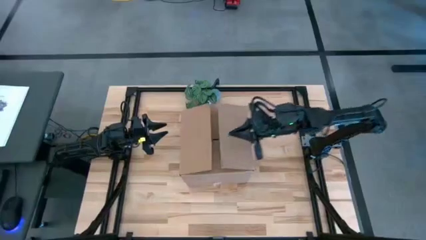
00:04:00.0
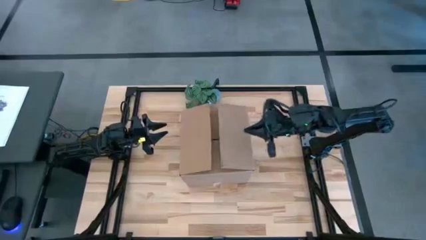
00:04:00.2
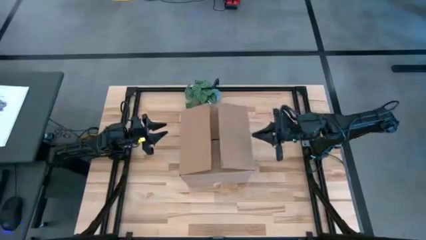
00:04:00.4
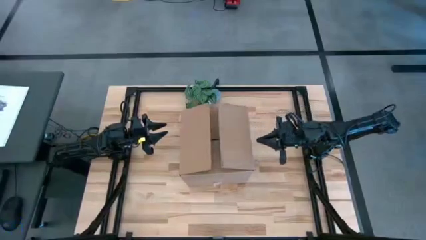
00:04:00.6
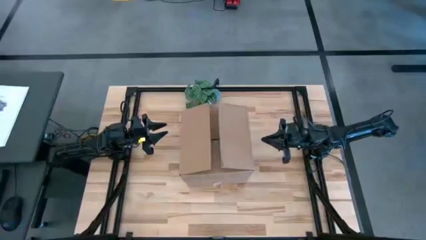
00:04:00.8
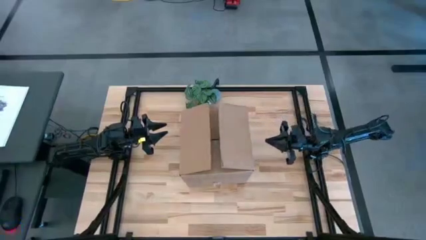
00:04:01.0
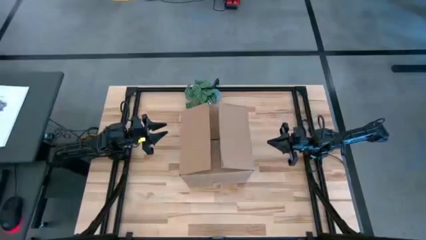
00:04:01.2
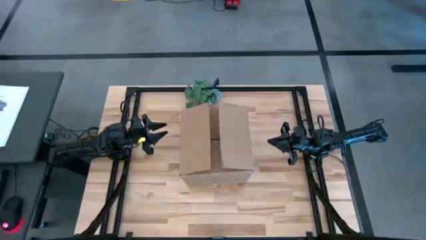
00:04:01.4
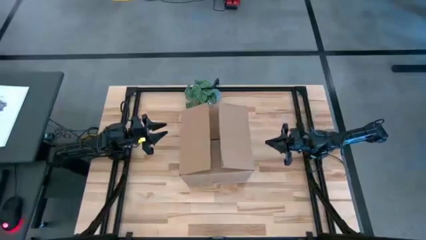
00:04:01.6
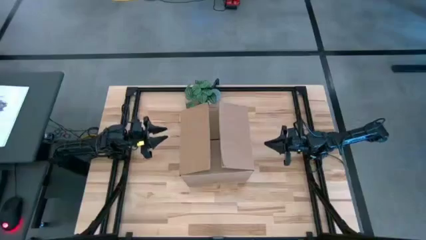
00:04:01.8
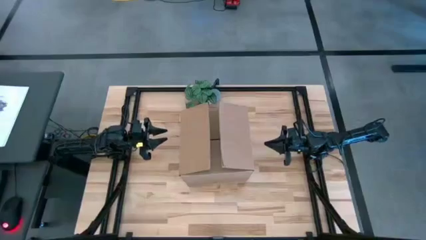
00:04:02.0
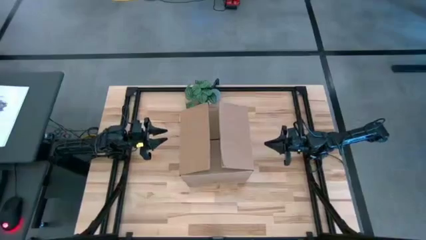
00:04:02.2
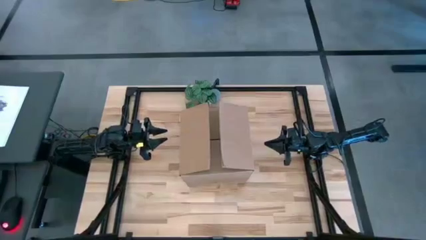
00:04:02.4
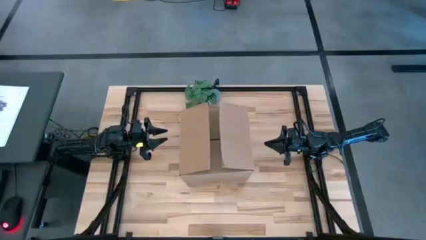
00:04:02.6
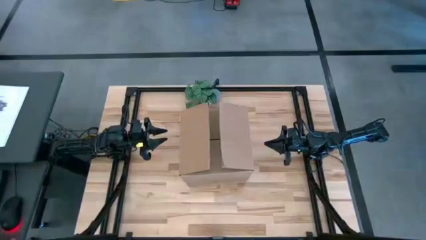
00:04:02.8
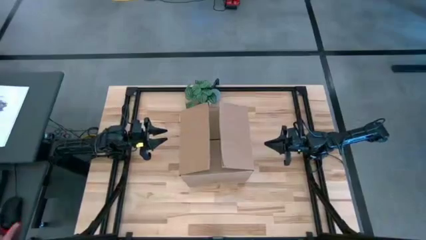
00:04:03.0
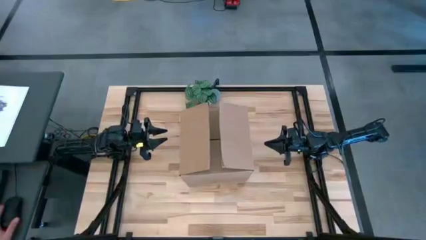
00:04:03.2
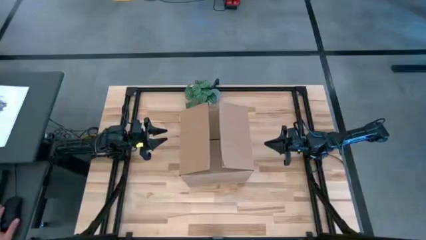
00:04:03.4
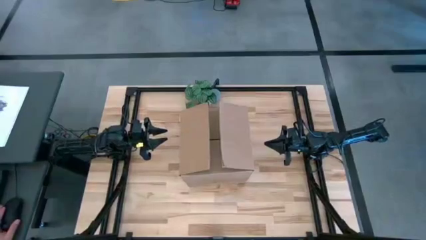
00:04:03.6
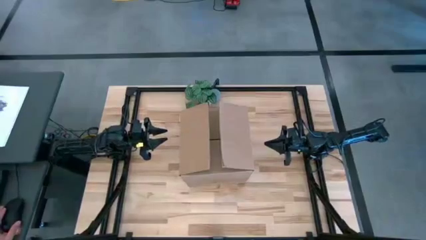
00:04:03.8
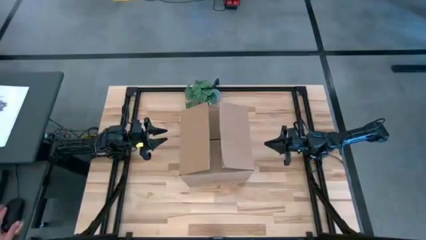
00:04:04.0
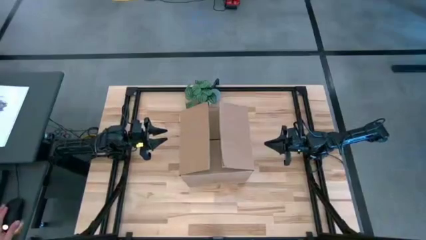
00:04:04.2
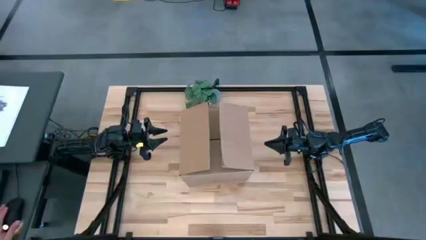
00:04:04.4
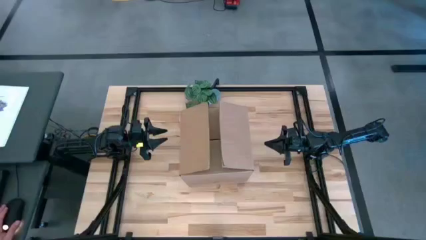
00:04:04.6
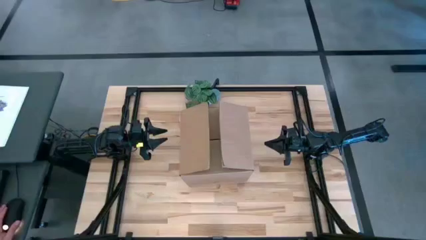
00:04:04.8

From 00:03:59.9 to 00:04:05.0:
Task: wrap mug
Return to Home Position

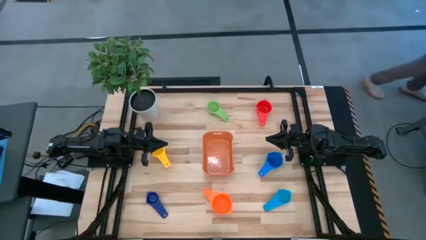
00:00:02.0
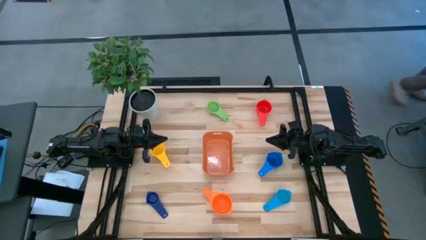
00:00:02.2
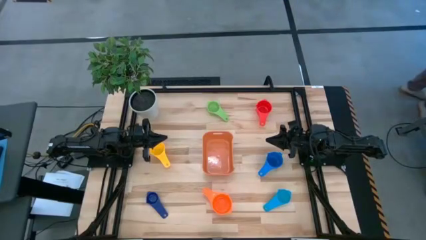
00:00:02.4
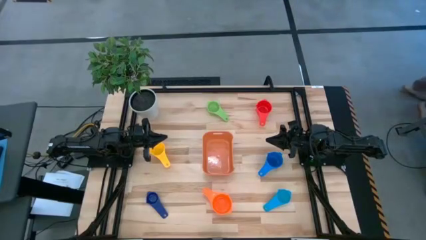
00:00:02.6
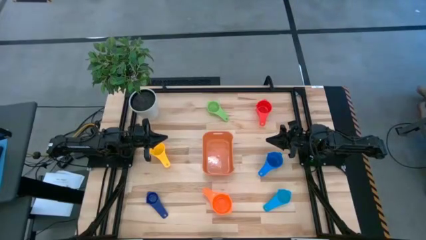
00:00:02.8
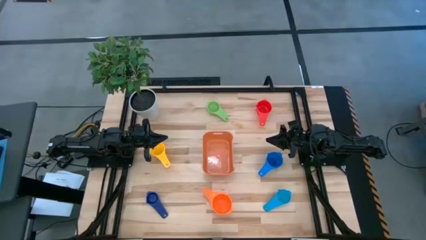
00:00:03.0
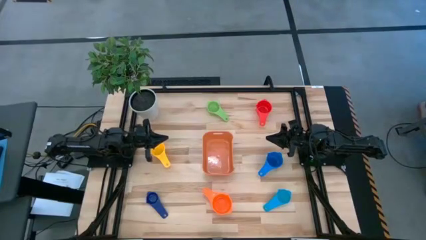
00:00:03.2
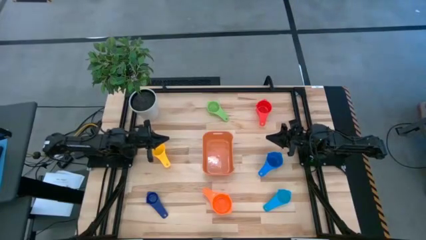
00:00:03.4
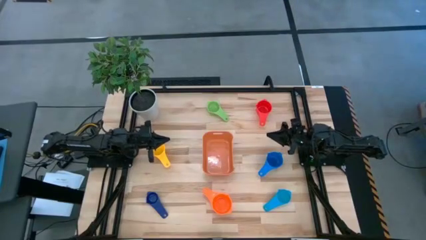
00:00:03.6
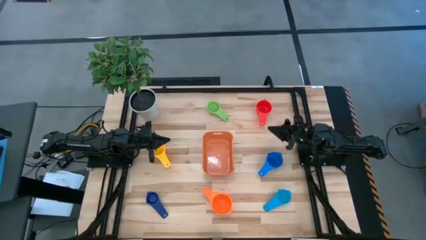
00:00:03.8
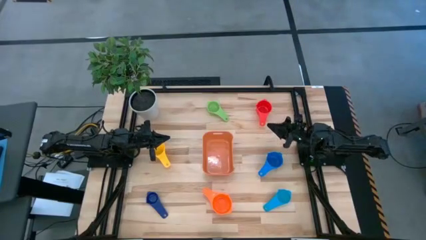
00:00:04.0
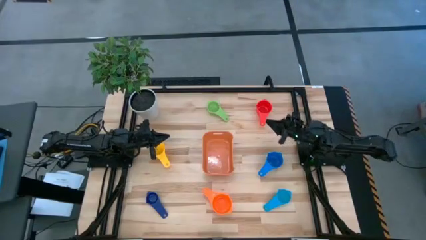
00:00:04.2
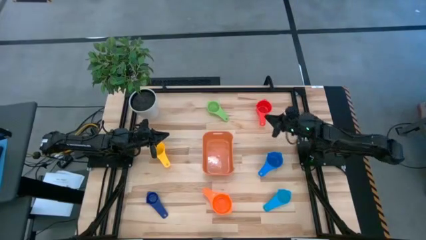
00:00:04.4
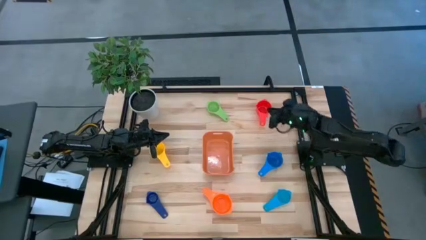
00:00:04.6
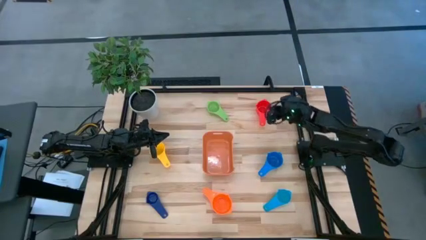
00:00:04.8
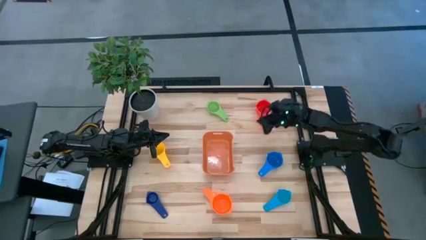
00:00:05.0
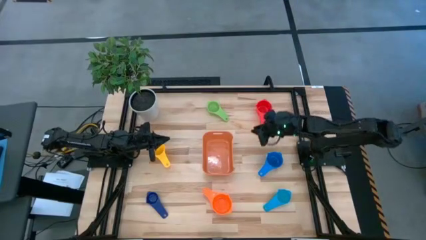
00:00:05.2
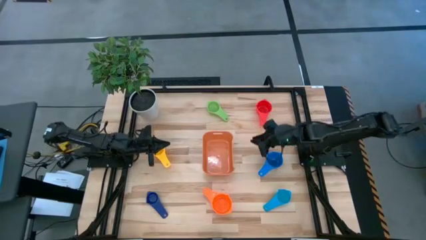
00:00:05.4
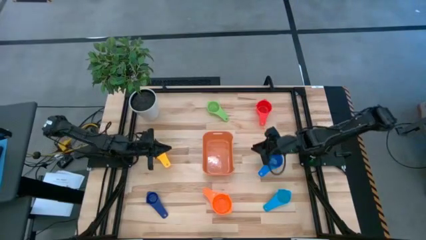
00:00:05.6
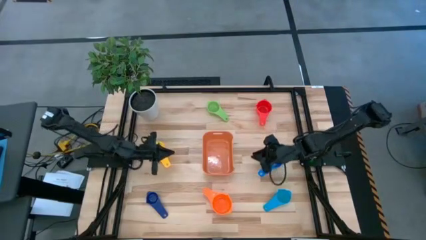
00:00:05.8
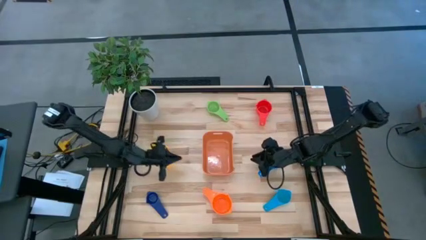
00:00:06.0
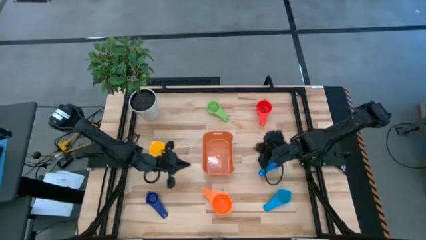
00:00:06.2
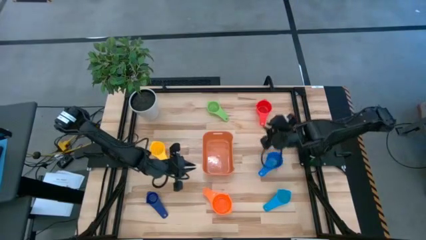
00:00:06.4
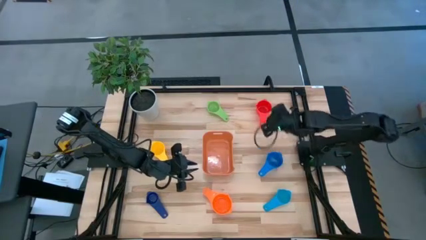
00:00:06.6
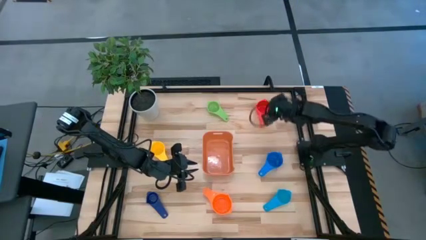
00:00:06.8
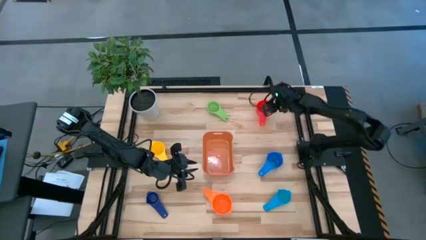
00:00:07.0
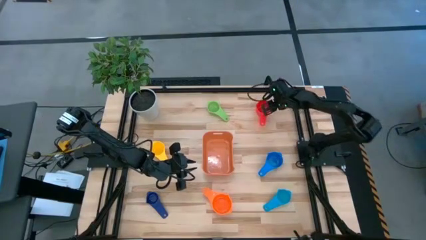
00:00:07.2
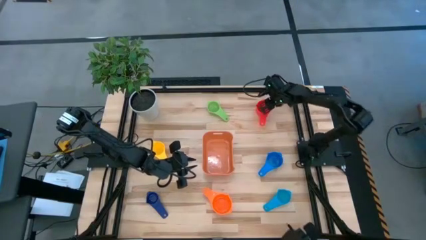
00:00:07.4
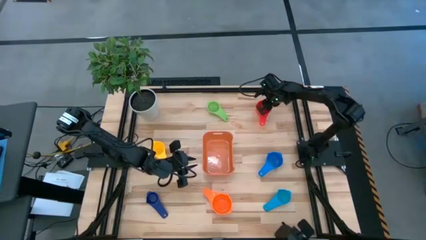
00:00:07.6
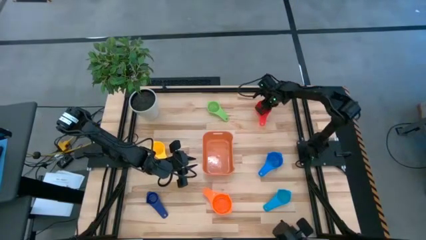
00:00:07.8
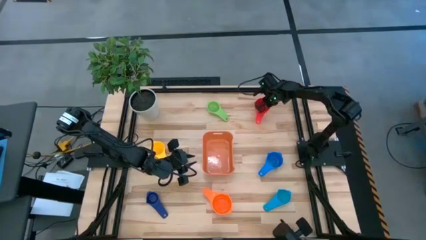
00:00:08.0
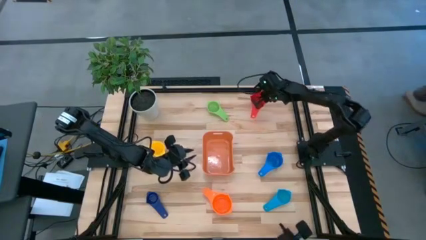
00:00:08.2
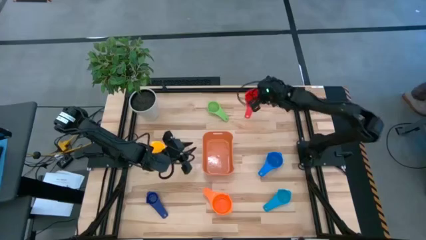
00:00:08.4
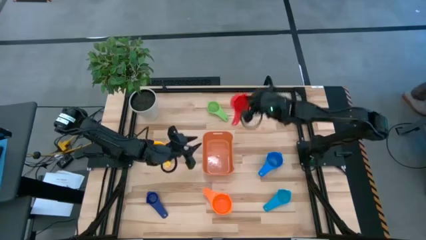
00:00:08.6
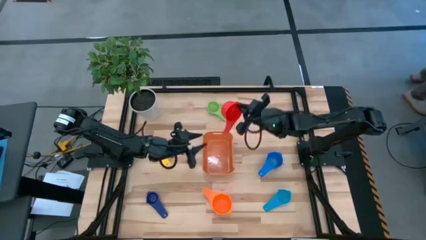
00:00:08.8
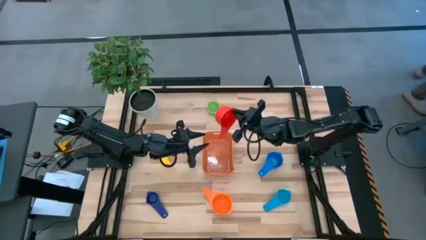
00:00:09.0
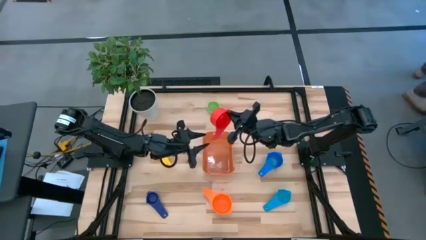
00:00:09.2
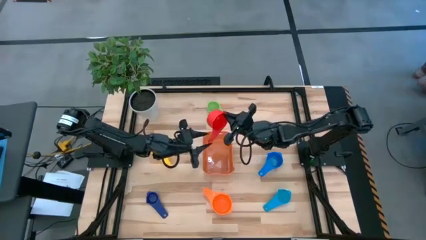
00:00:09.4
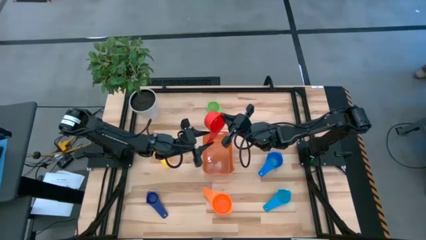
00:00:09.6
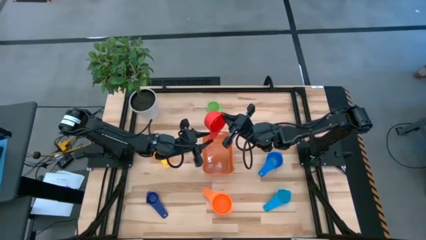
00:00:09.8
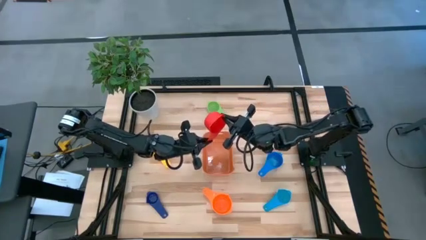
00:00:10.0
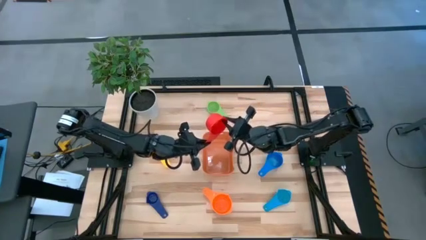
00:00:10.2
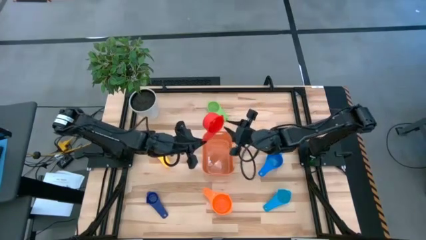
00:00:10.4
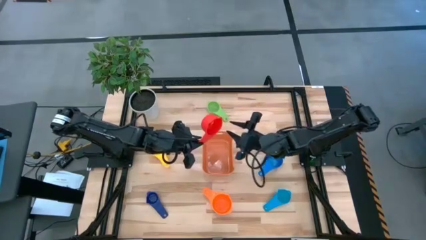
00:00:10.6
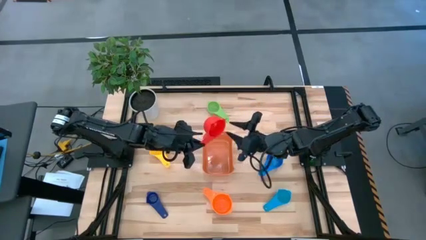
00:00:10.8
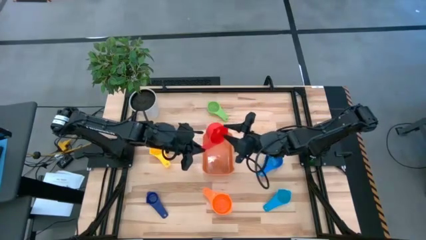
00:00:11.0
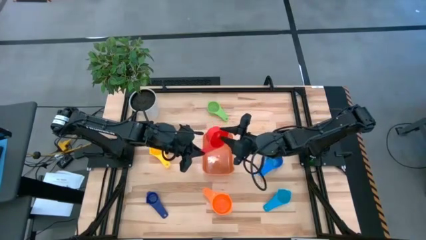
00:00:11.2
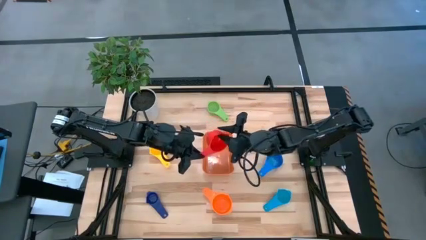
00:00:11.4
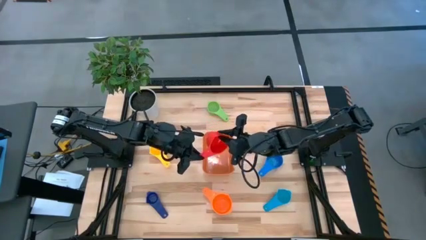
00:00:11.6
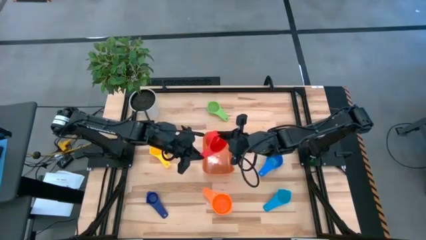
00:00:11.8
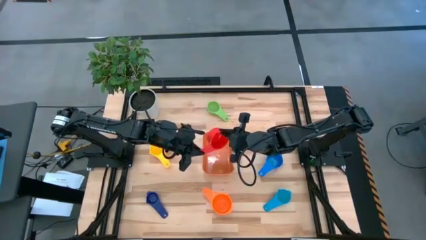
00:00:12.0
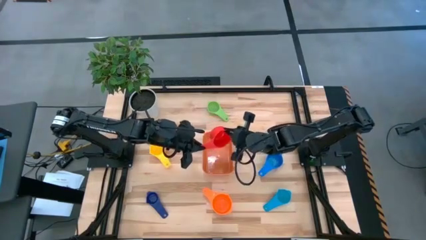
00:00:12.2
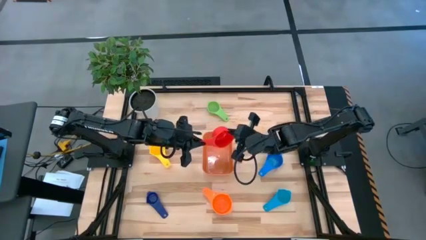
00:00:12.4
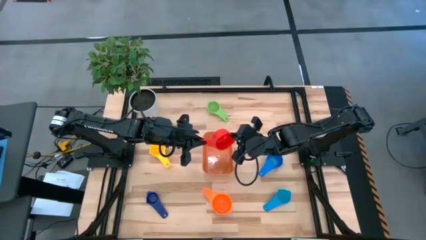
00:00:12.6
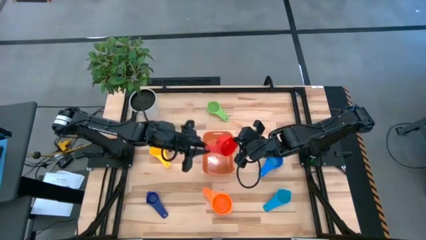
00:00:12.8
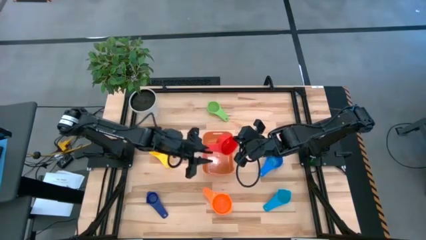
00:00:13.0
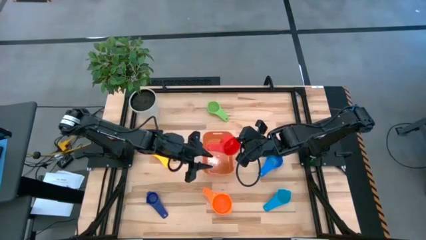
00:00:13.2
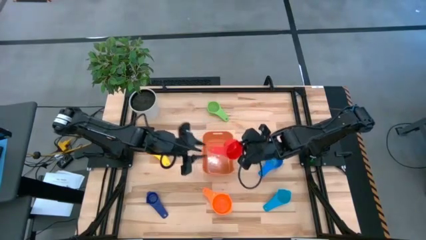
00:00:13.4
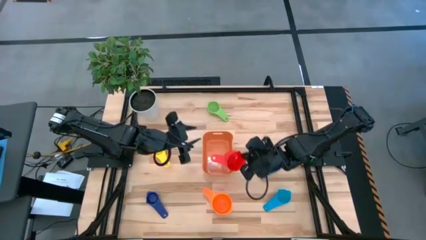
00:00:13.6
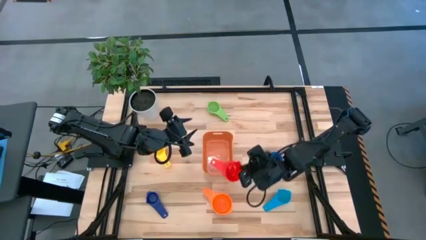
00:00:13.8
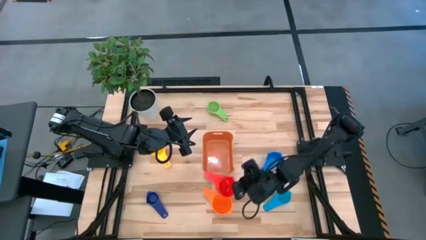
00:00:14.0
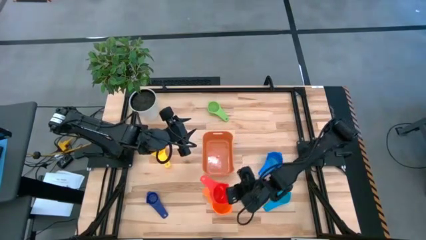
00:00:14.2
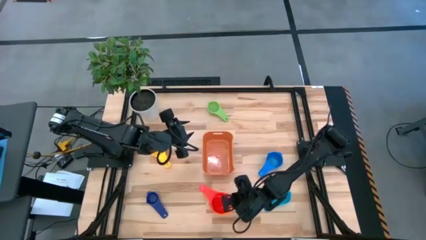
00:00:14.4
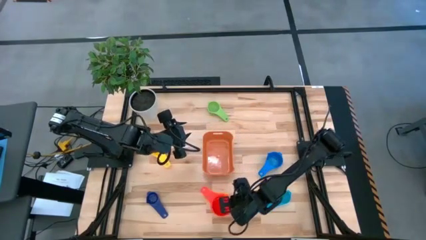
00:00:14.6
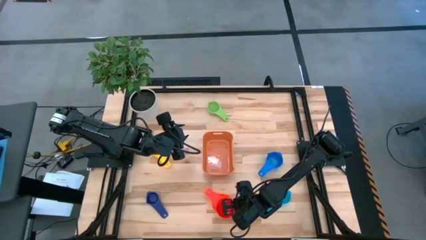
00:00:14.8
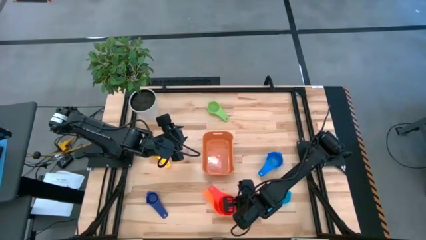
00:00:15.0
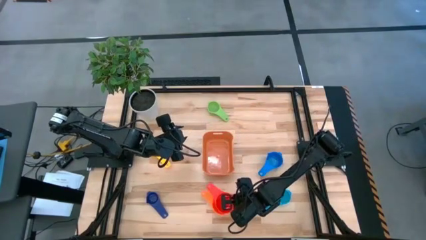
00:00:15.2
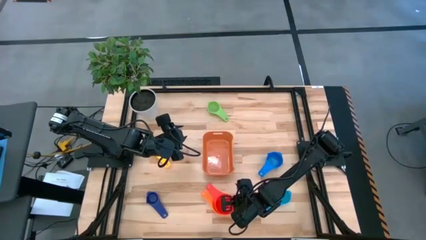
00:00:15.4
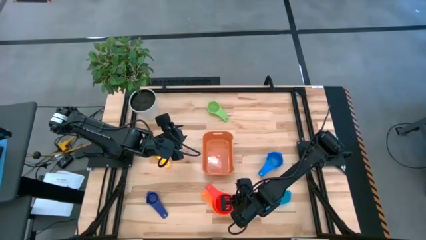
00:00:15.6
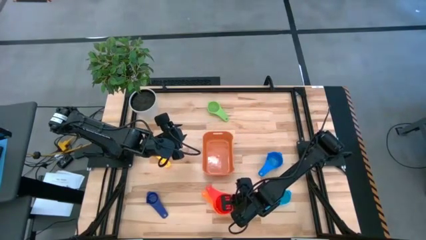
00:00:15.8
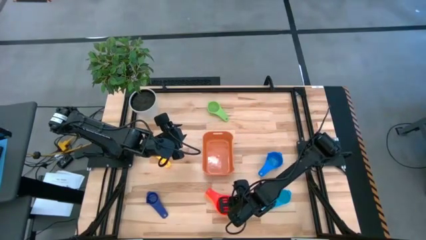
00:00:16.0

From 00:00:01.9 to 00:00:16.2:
Task: Nest measuring cups in basket
Stack the red measuring cup on top of the orange measuring cup
